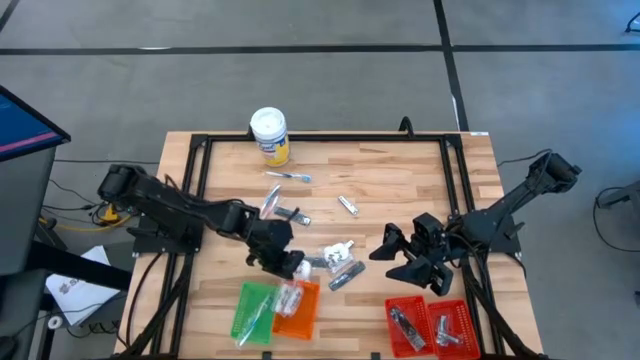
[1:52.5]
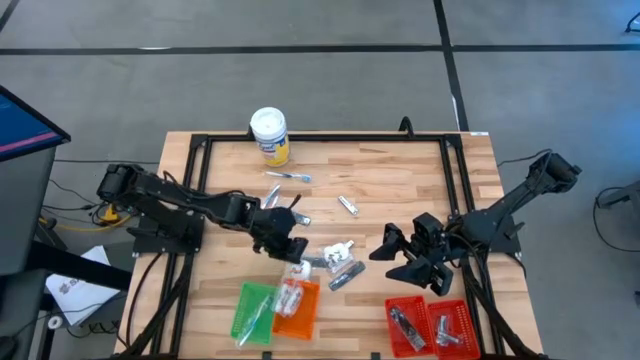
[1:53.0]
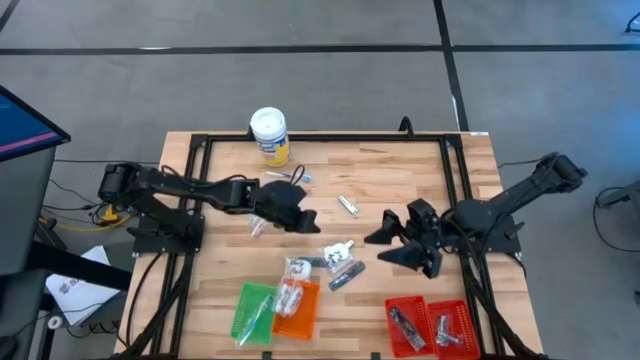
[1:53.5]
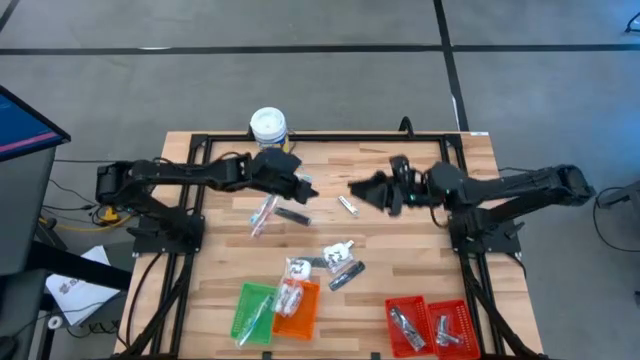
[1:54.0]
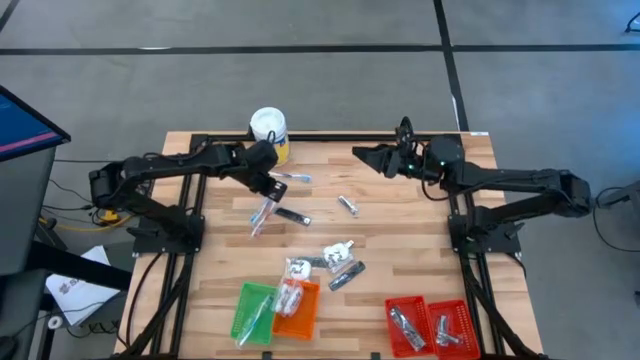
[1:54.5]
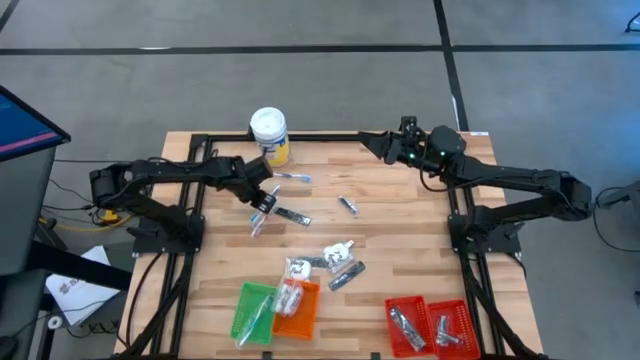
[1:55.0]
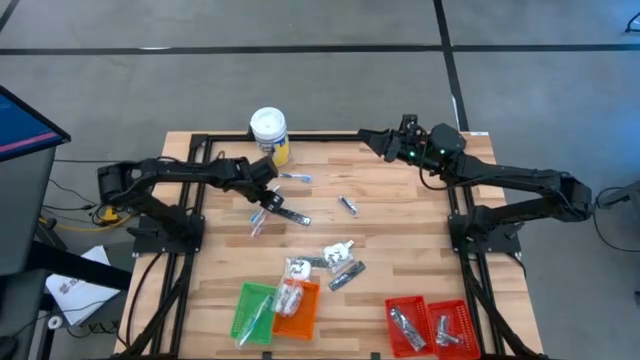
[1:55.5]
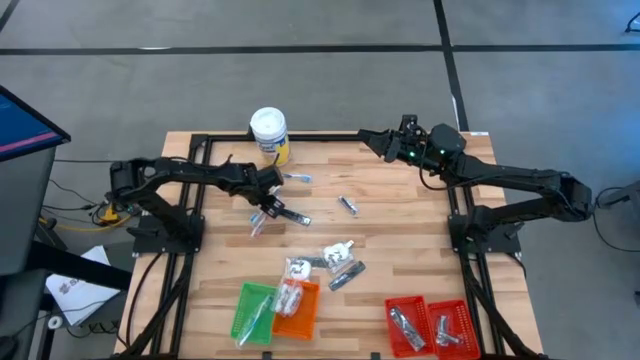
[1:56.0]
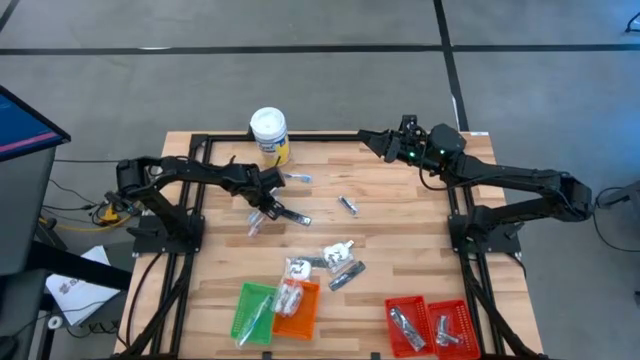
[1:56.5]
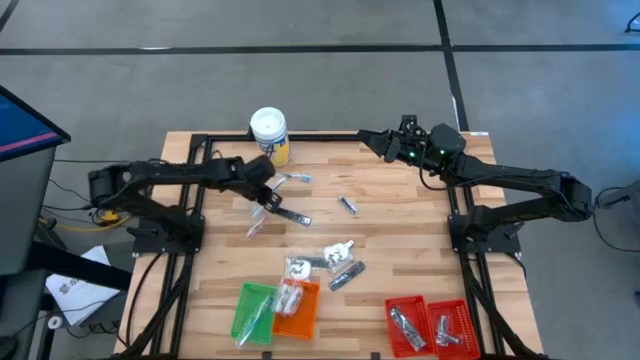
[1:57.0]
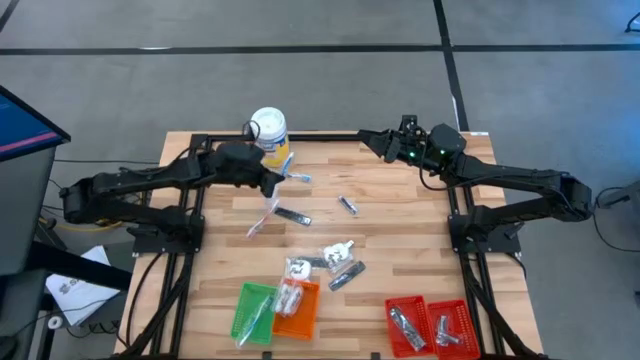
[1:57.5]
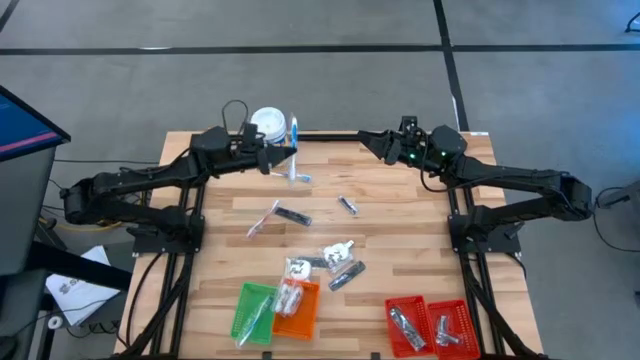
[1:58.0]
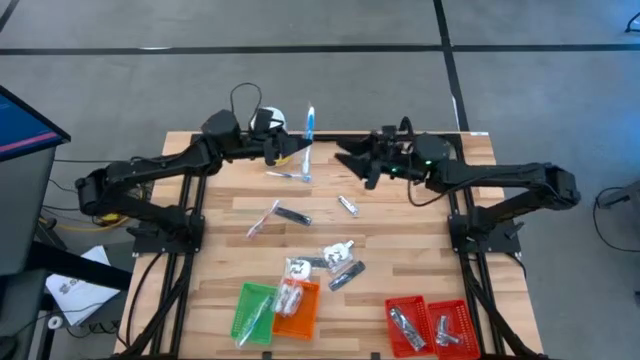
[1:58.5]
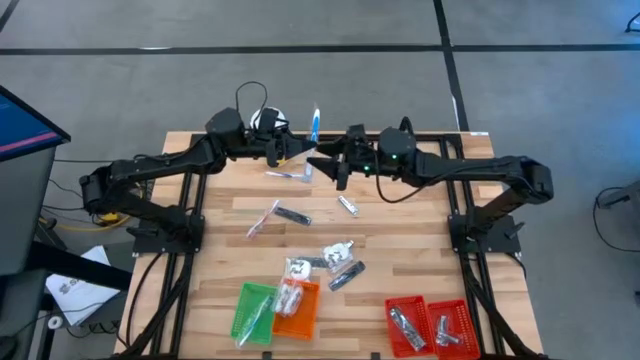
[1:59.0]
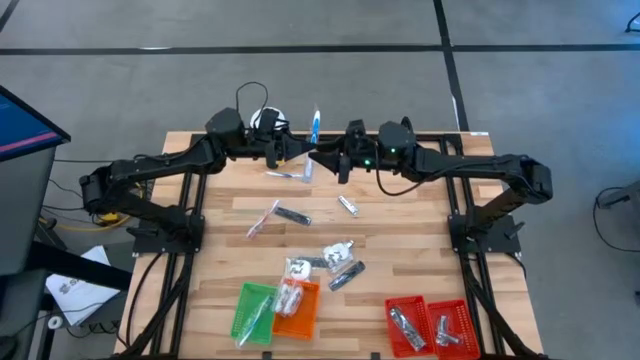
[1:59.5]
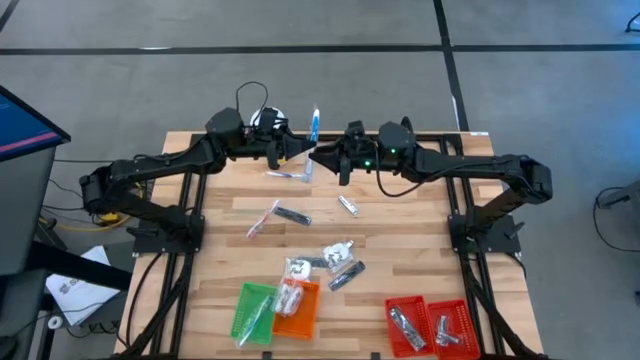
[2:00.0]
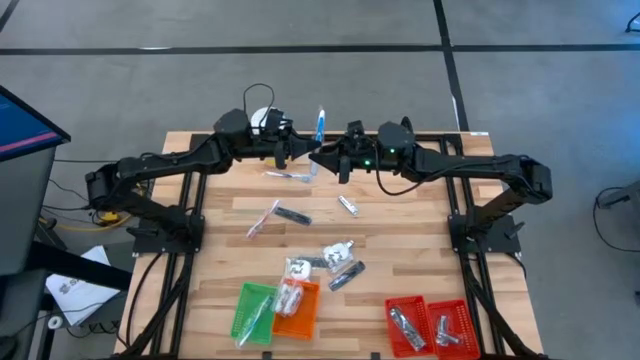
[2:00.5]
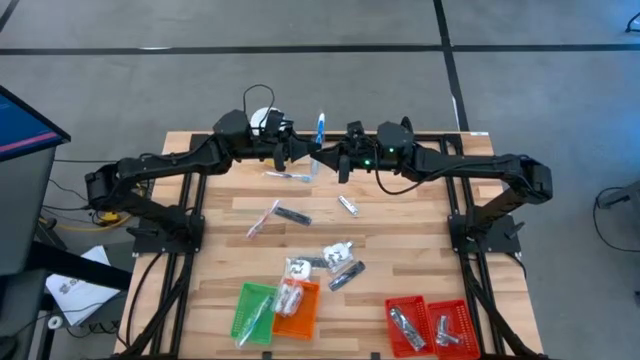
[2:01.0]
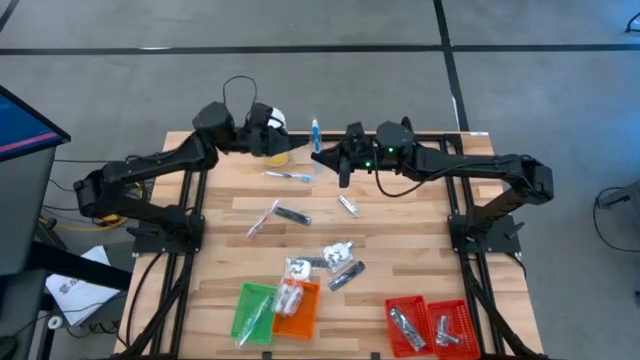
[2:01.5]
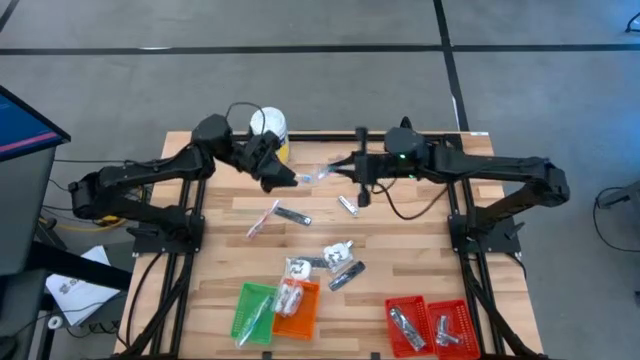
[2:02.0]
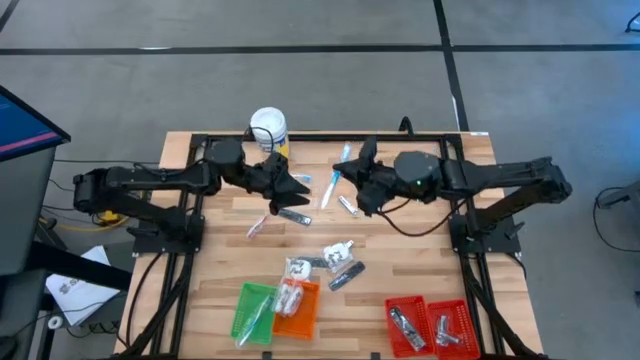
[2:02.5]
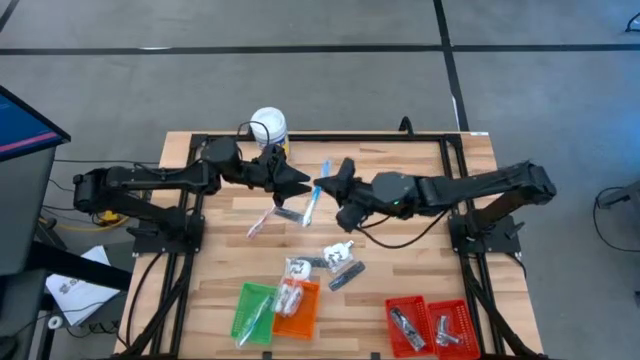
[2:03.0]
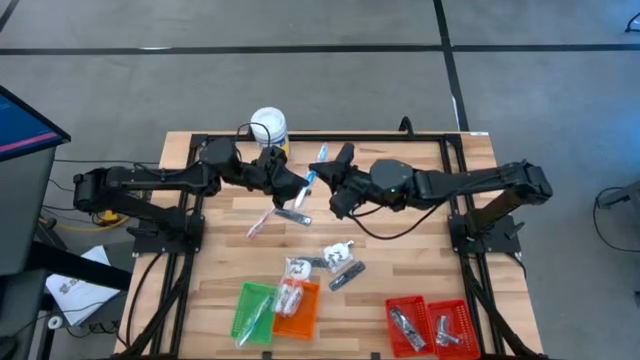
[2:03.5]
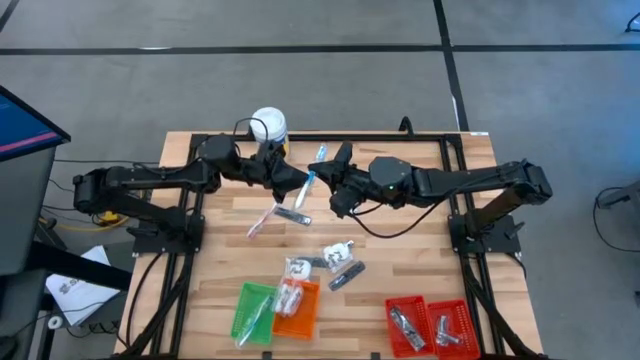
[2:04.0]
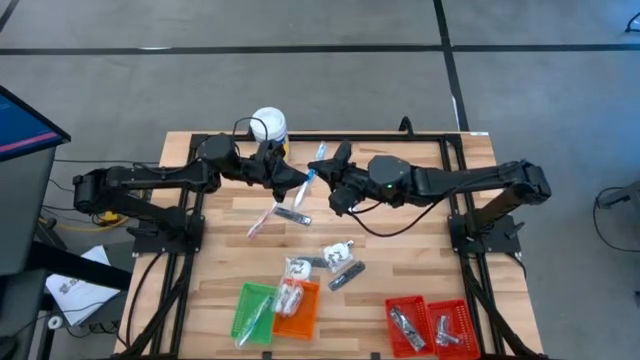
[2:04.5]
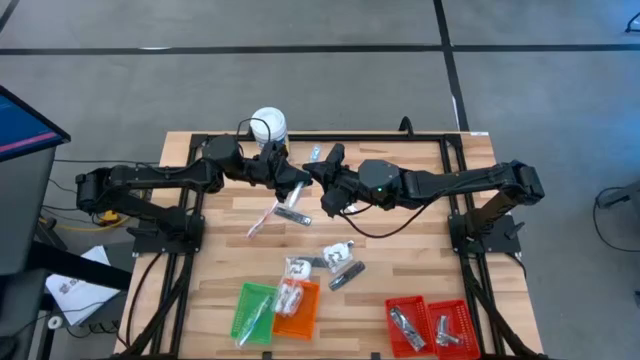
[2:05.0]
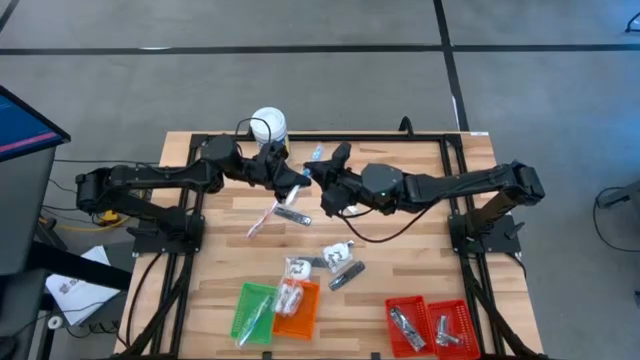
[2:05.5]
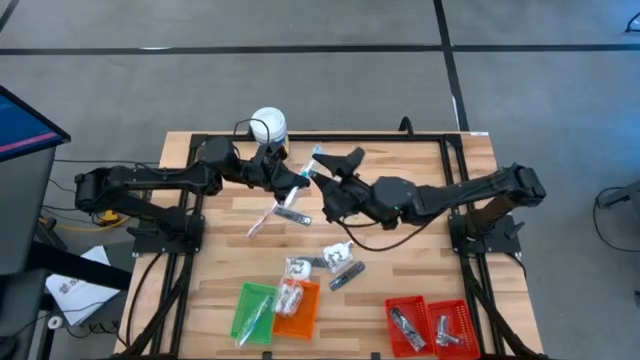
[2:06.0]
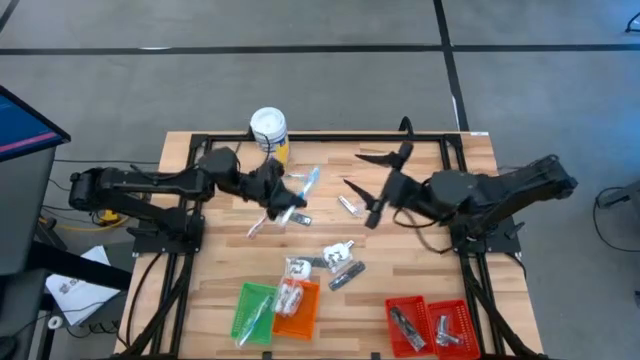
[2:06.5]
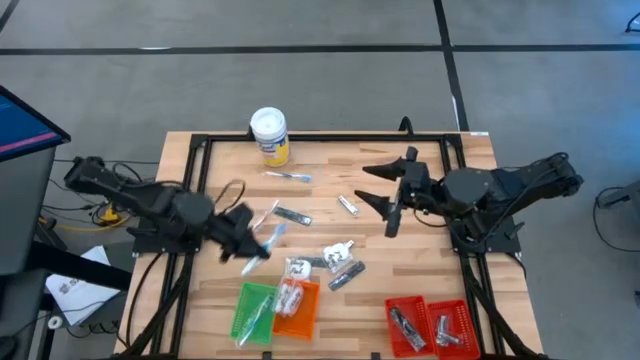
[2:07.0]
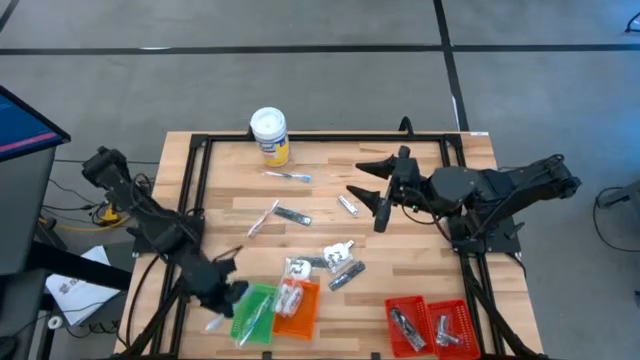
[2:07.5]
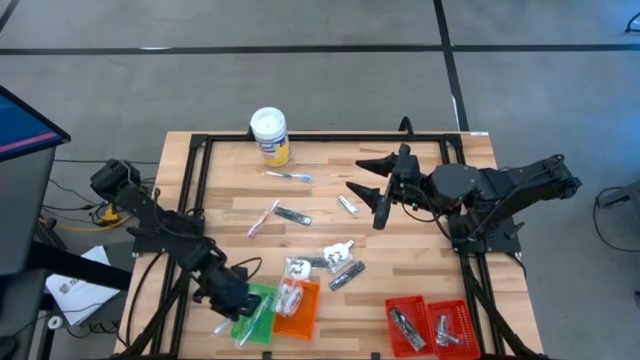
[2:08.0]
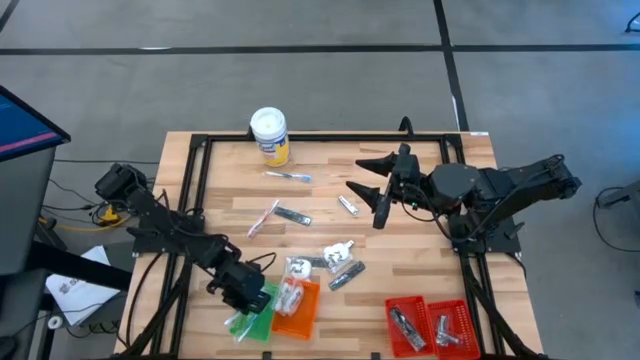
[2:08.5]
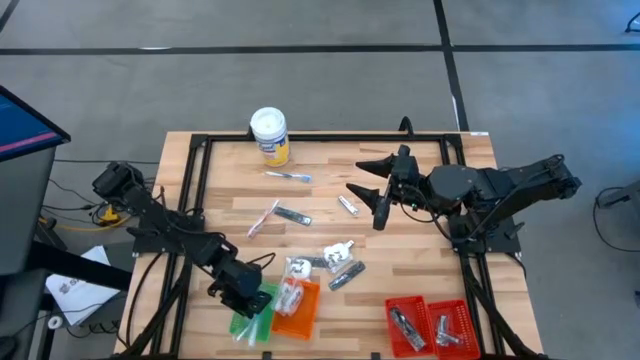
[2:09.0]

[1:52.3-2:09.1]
Task: Pick & Place Travel size toiletries
Put the blue toothbrush into the green basket

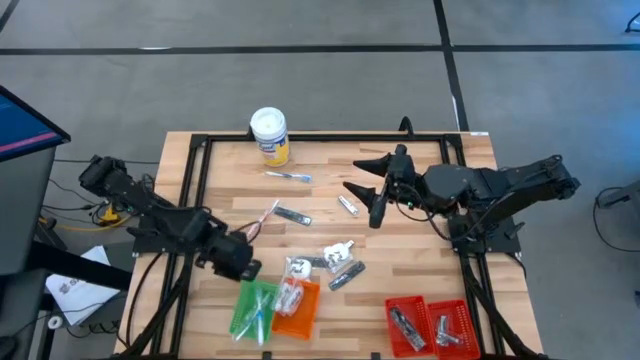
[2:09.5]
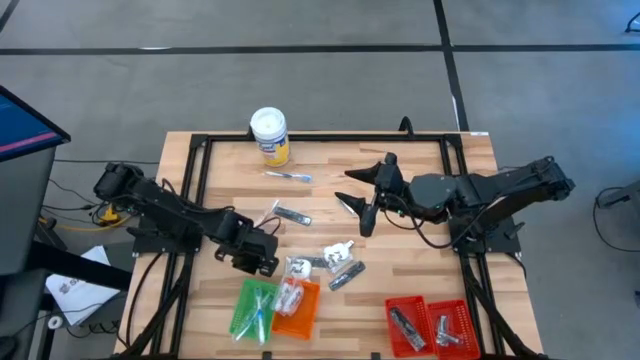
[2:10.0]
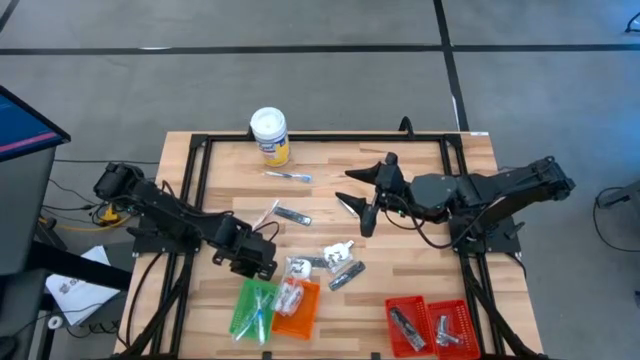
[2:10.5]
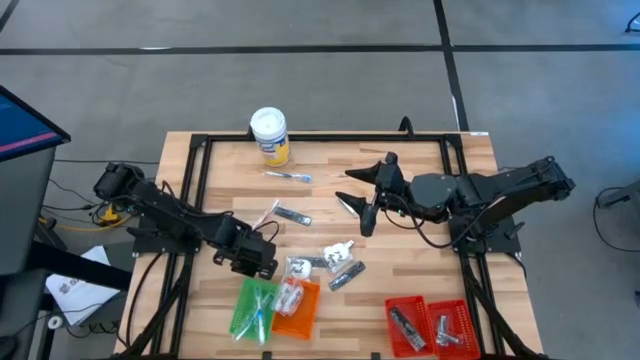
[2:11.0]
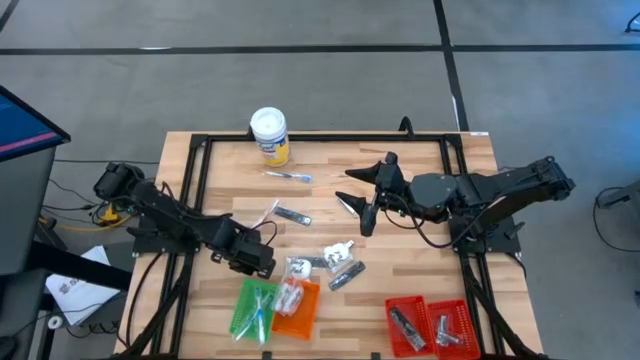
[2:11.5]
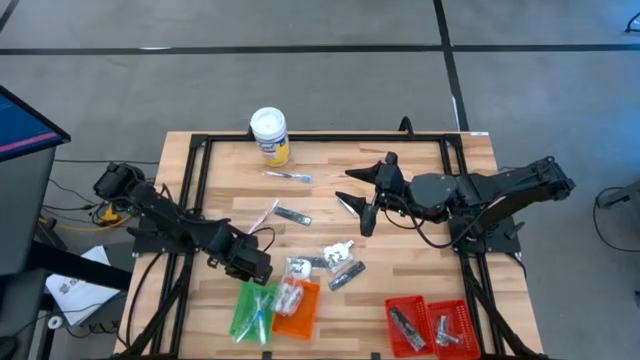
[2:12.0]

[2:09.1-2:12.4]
Adjust the green basket

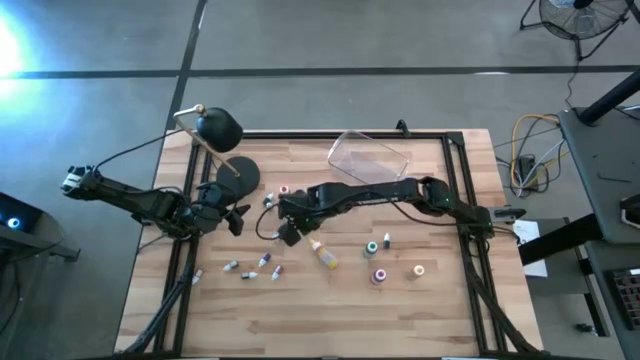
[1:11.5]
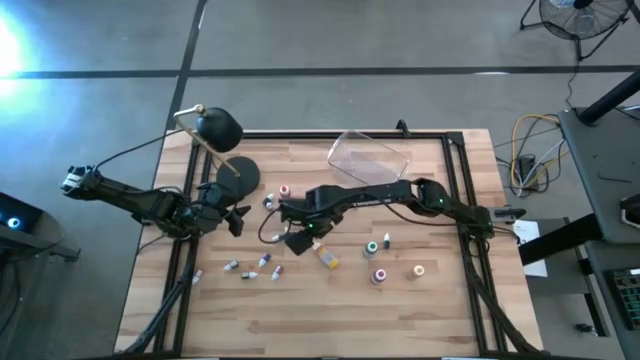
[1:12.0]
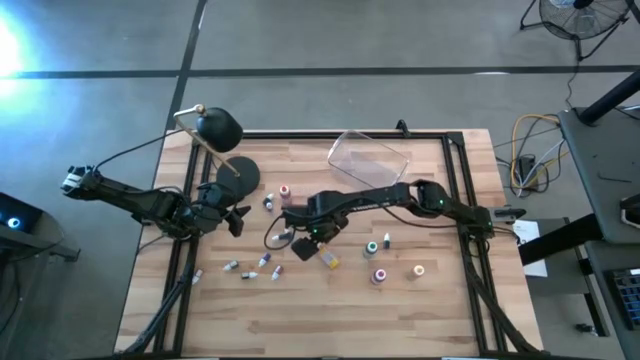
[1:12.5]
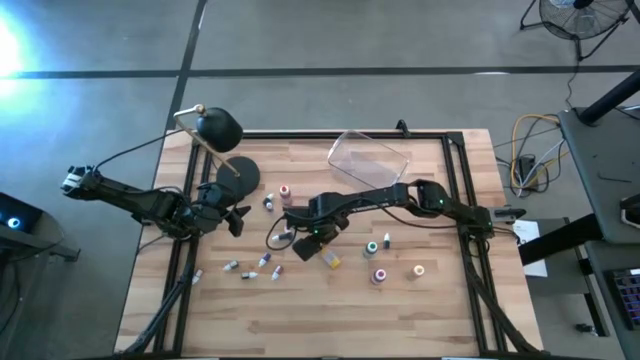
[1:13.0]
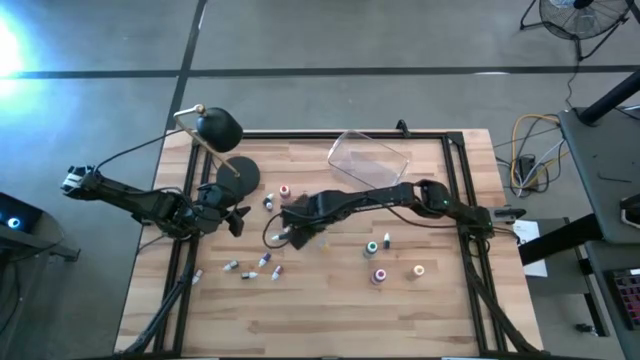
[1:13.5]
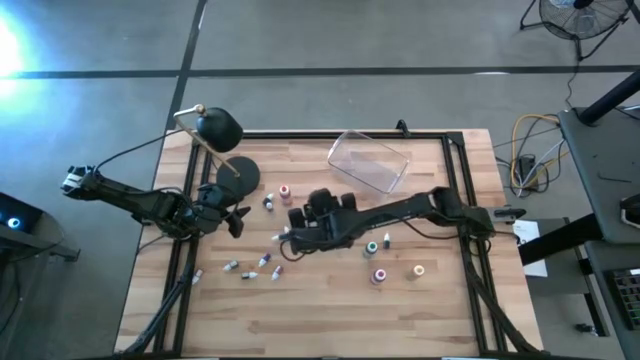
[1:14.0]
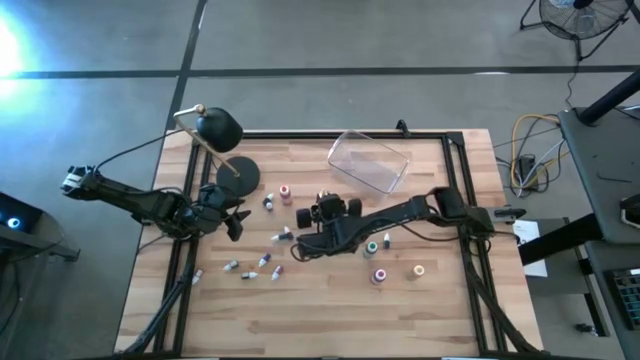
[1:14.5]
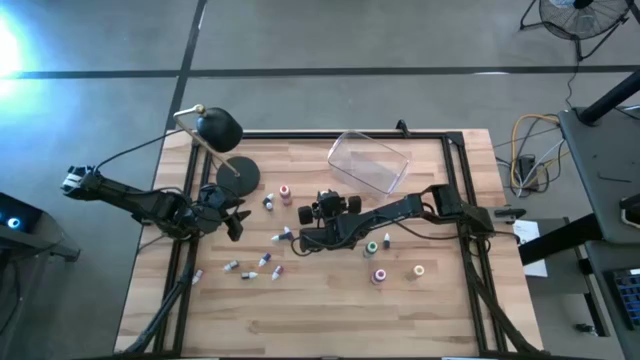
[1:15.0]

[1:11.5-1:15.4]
Task: Pick & Place food coloring
Adjust the large left yellow food coloring bottle
